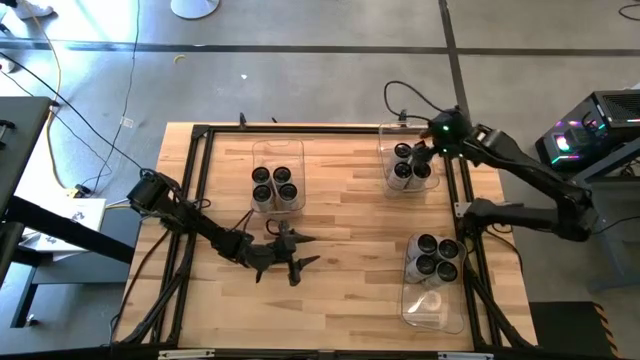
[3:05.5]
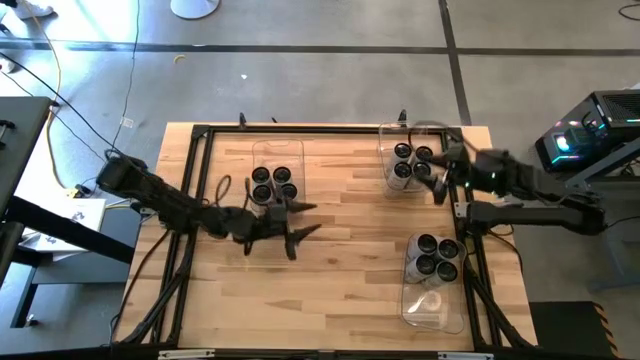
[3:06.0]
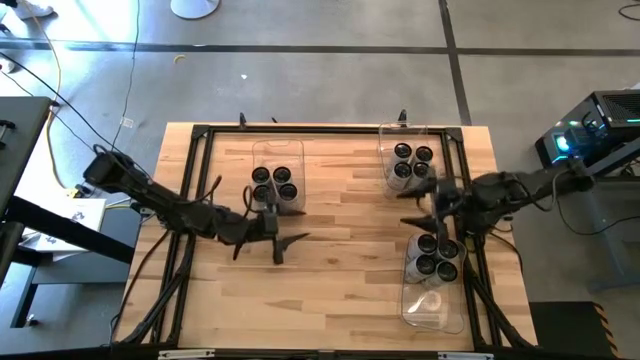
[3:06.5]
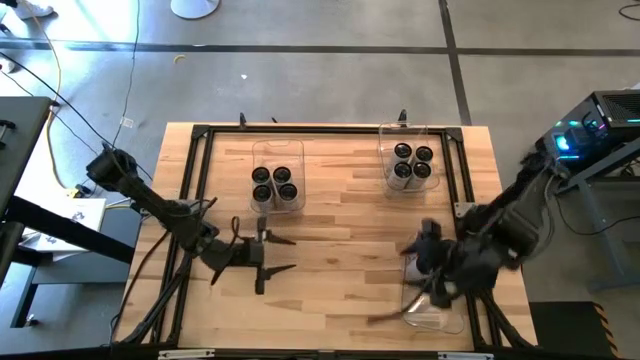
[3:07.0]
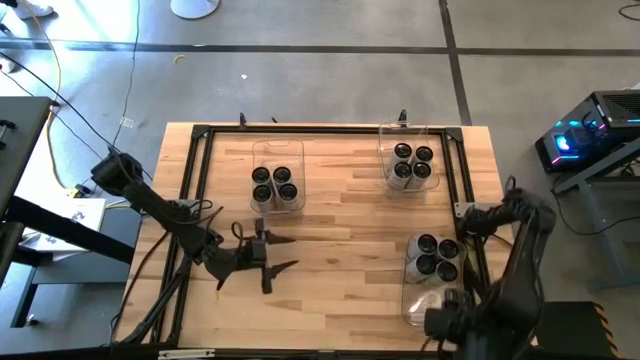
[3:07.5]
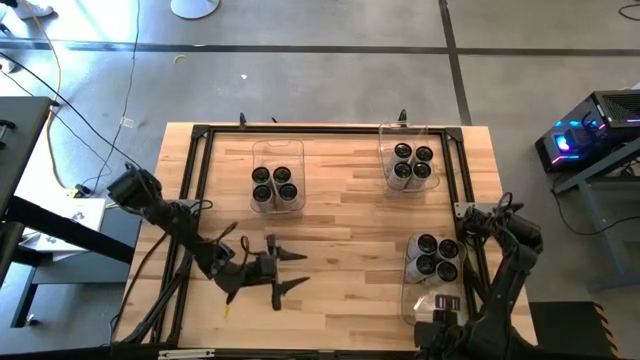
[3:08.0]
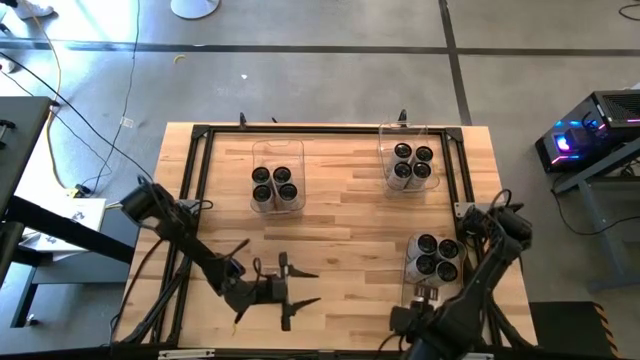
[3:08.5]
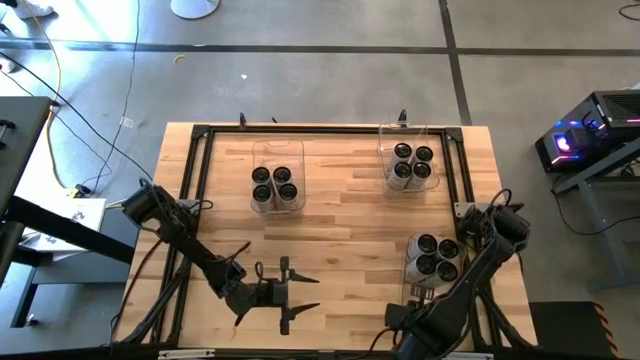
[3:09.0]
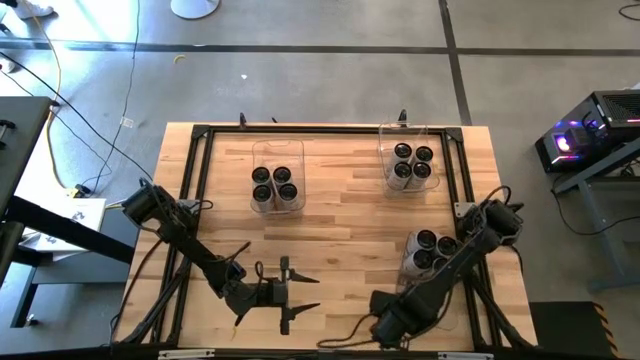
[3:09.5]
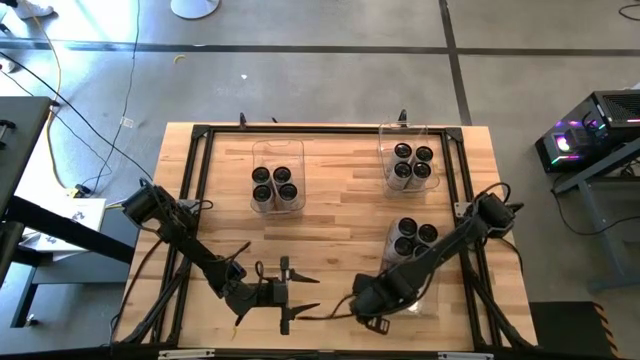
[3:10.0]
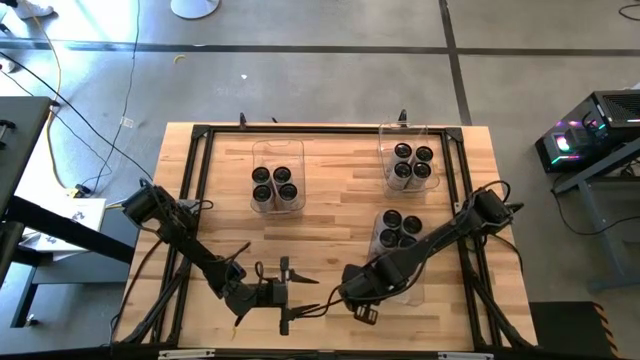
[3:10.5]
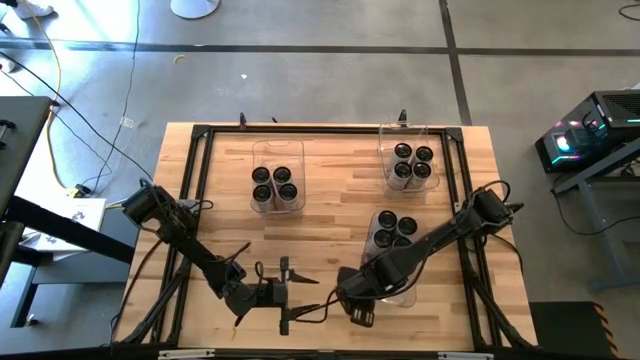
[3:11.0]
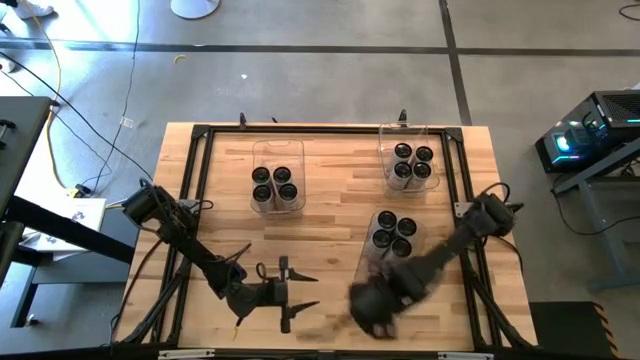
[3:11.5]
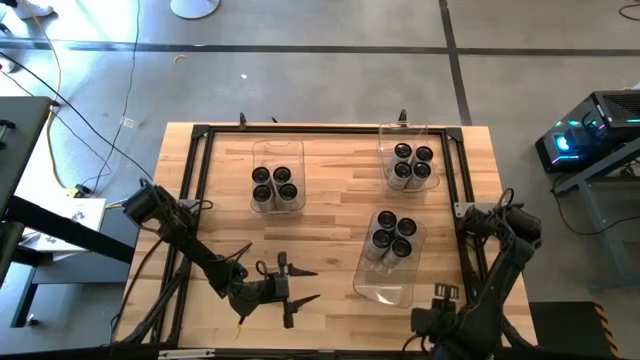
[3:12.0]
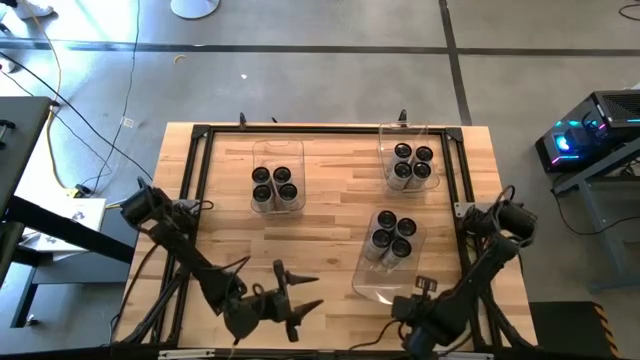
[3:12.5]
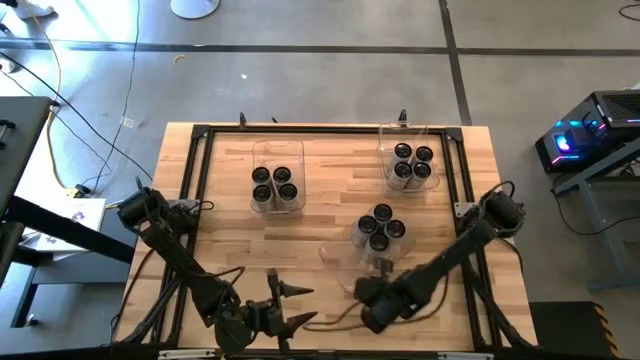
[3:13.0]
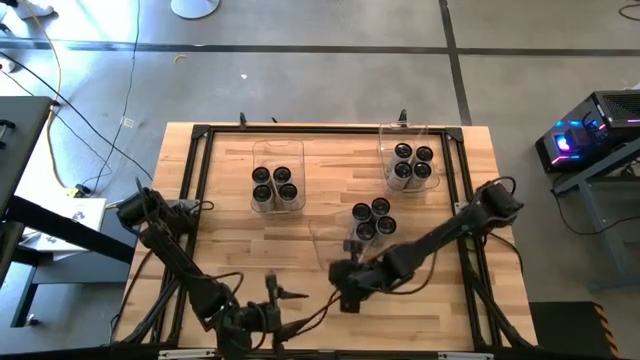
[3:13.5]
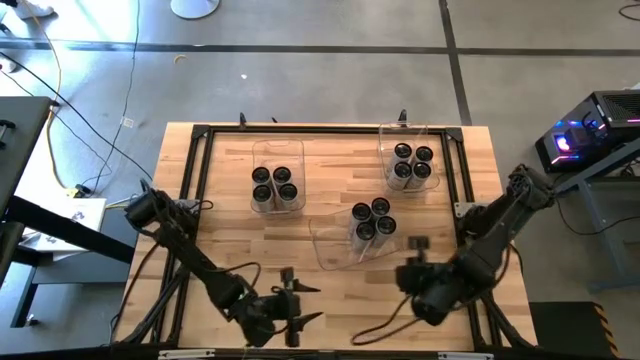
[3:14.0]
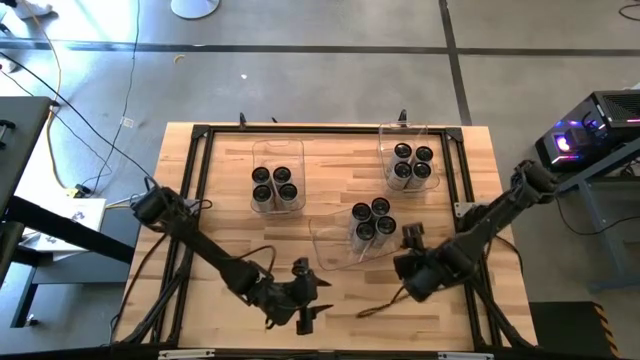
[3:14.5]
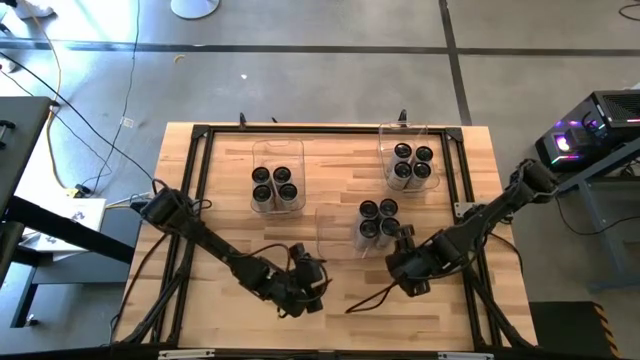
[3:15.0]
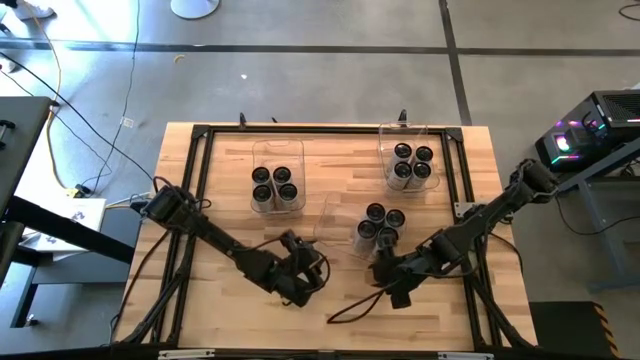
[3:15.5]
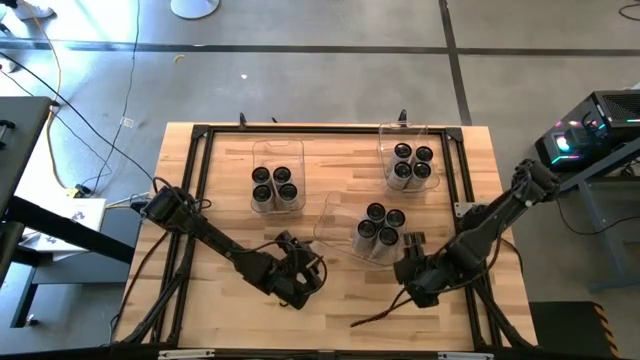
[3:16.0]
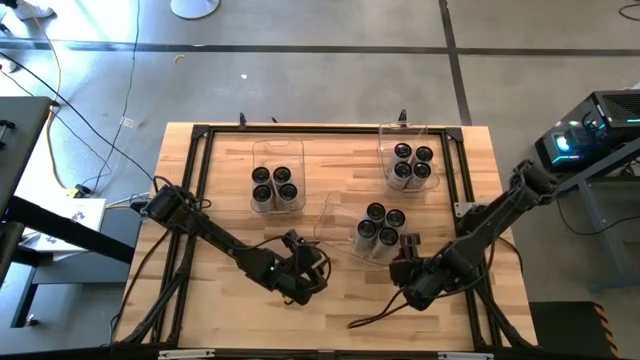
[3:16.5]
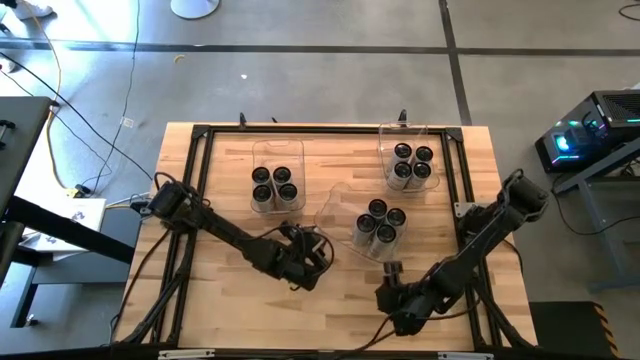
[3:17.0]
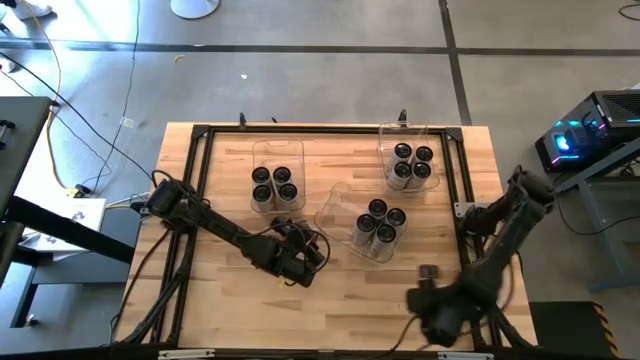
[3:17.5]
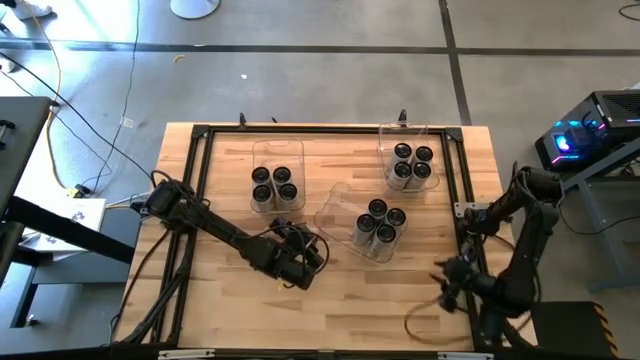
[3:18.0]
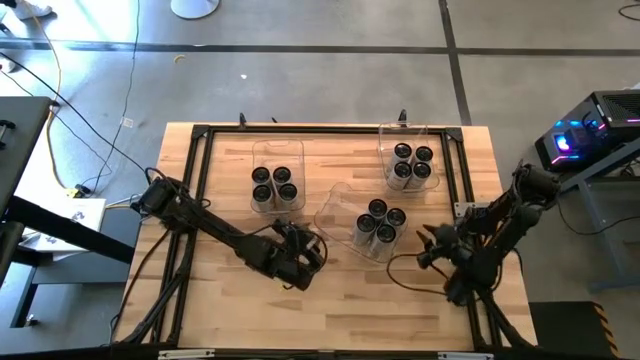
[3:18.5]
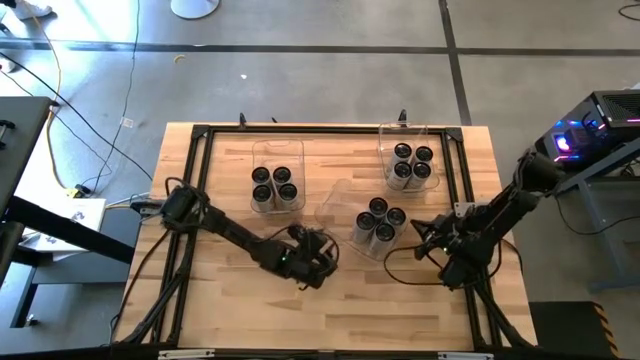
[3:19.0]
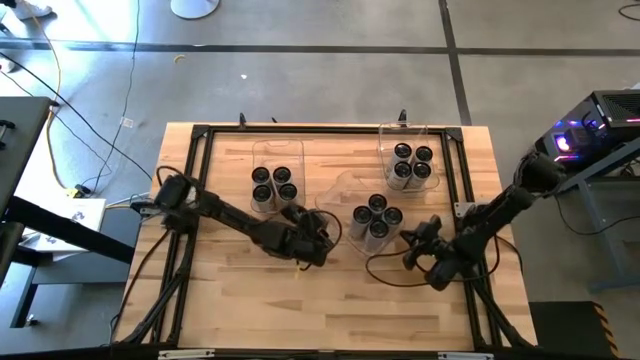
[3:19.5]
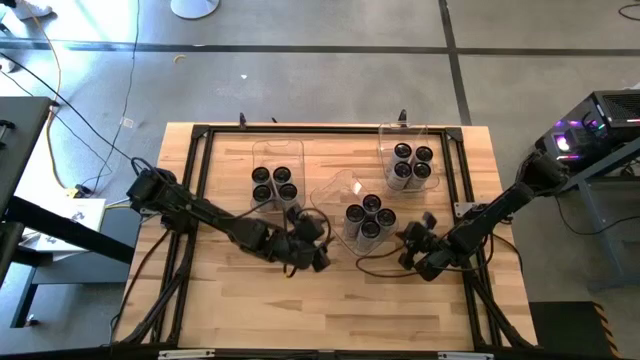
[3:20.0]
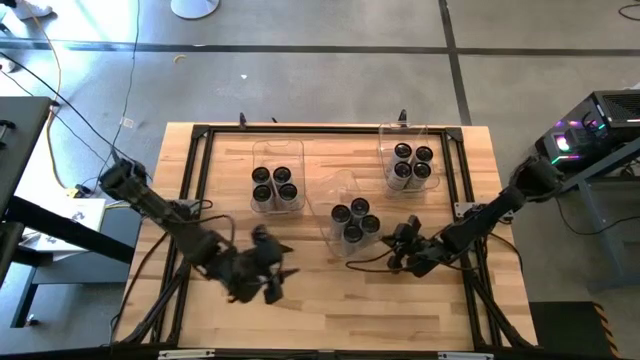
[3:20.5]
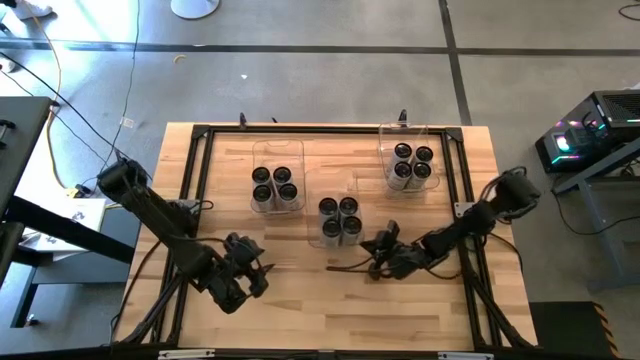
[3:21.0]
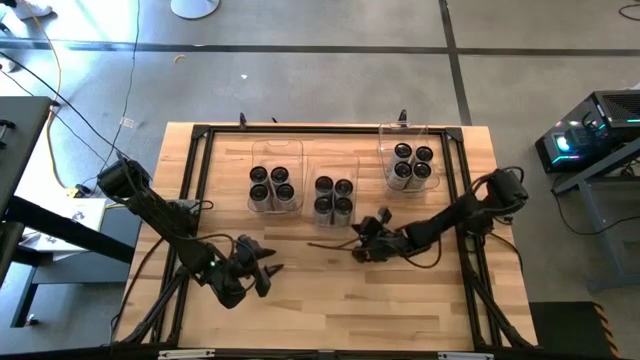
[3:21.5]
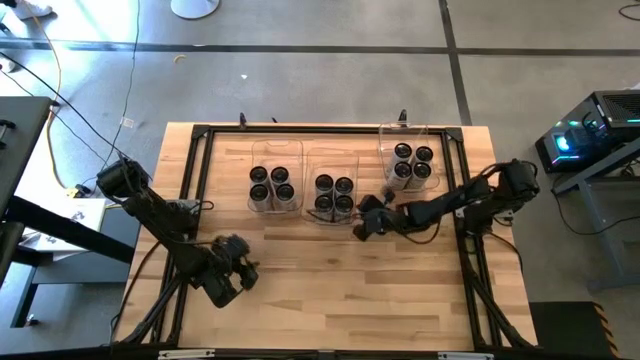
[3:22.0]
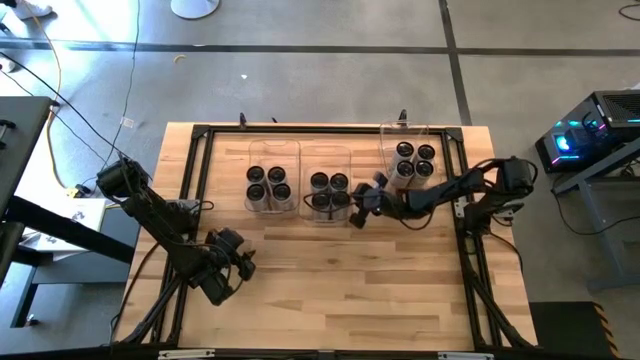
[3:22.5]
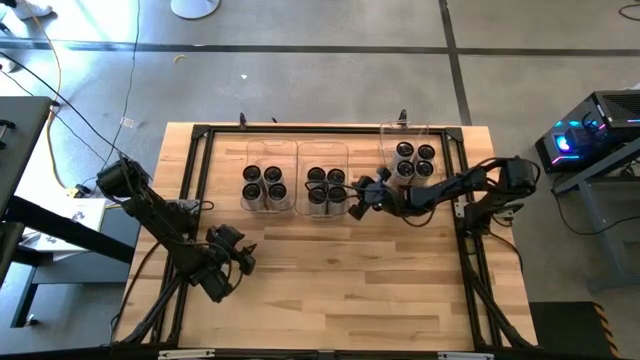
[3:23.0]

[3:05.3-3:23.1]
Task: Sort soda cans
Move the bottom transparent bin between the two transparent bins

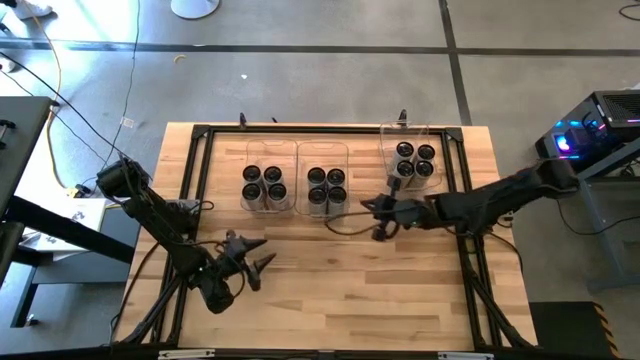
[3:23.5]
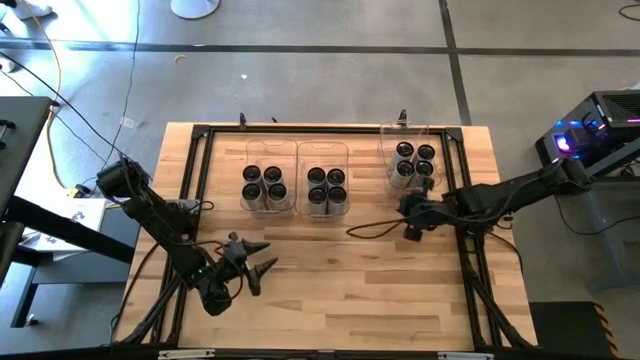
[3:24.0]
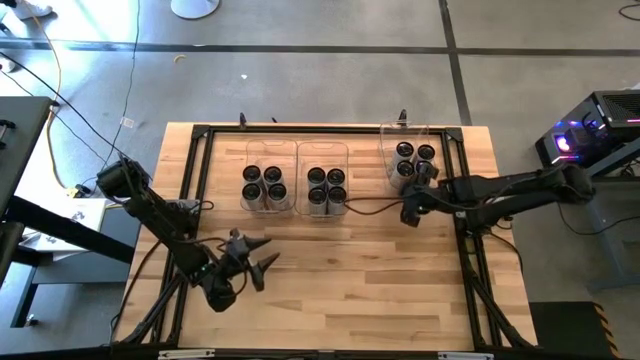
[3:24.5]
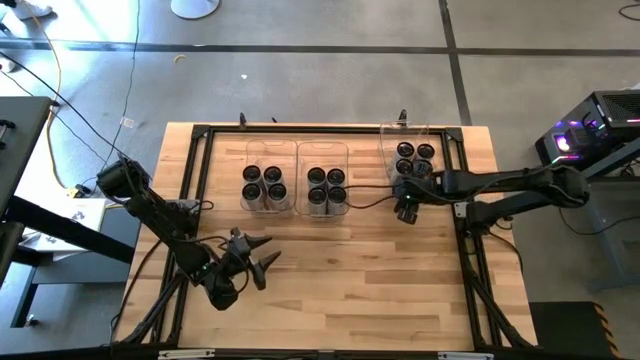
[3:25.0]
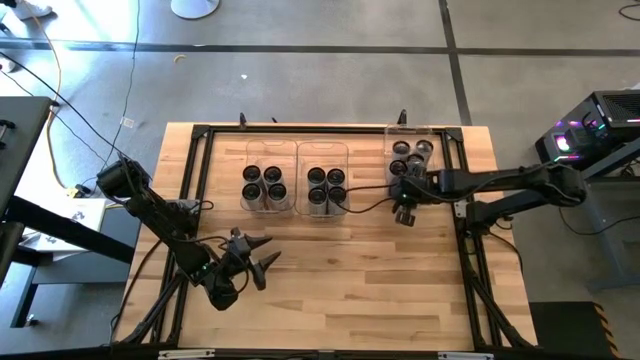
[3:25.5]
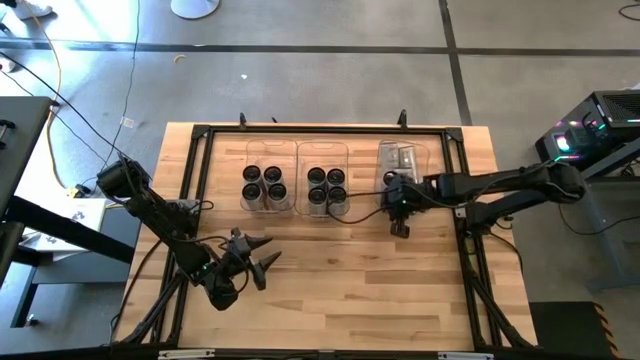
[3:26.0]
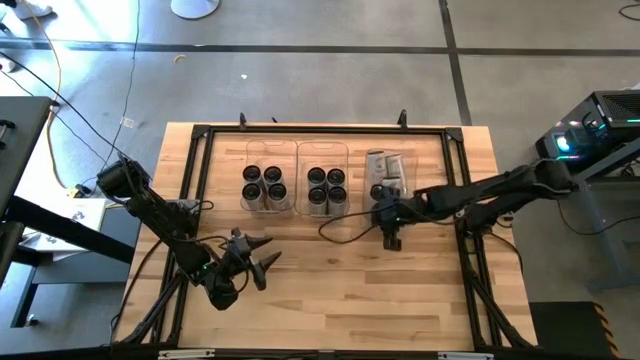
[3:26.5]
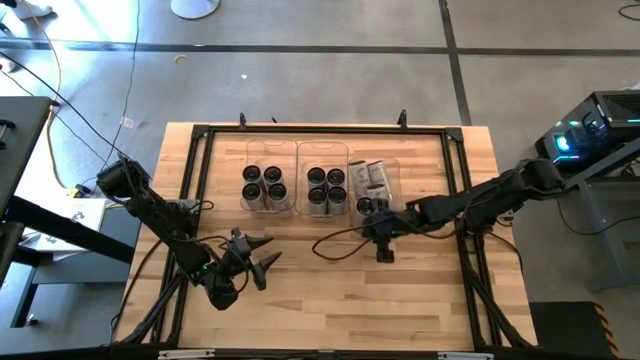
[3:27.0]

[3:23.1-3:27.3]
Adjust the right transparent bin to align with the other transparent bins on the table
